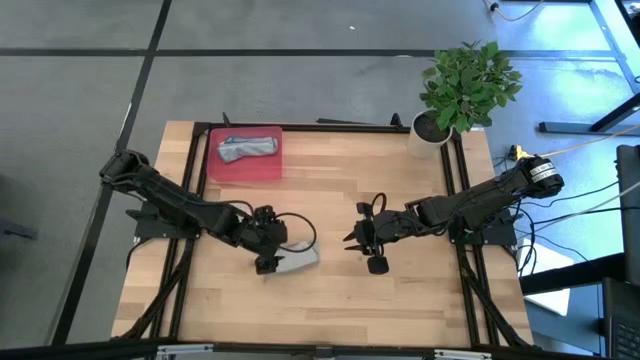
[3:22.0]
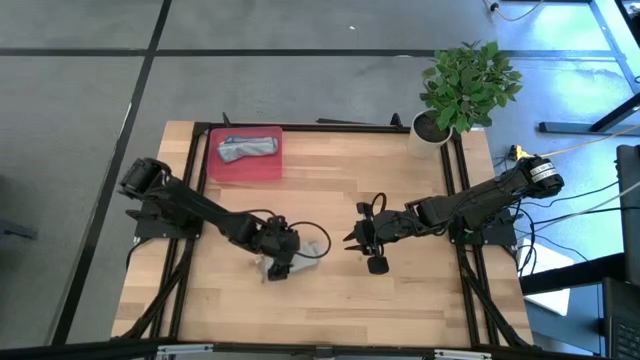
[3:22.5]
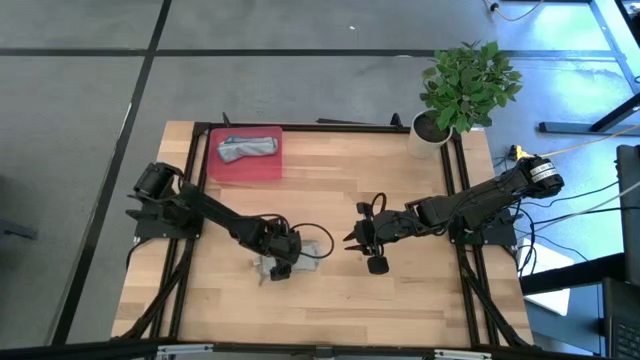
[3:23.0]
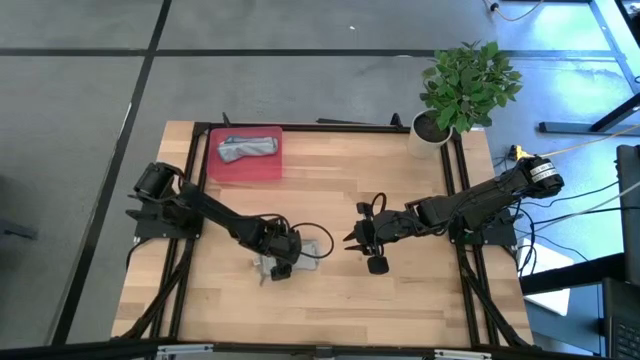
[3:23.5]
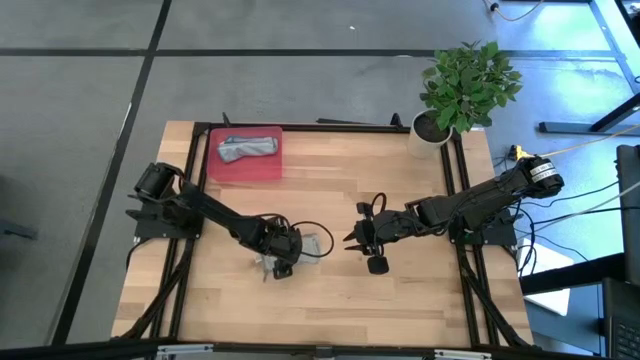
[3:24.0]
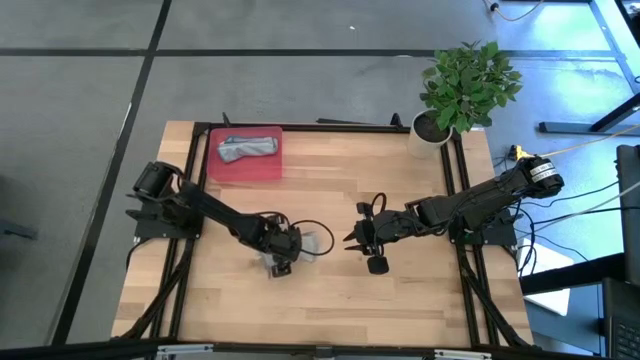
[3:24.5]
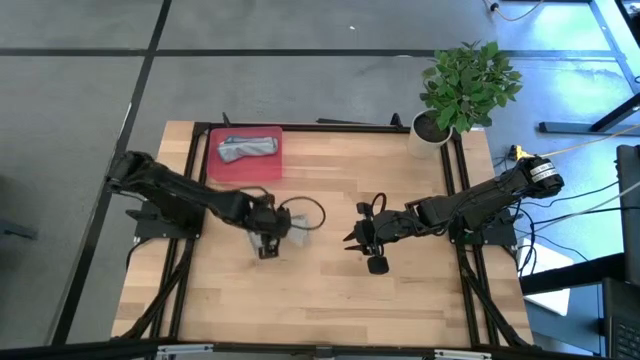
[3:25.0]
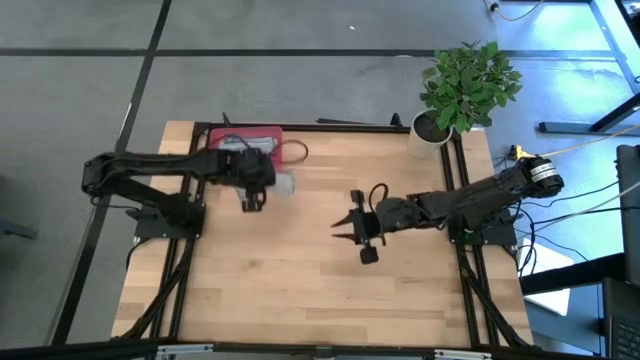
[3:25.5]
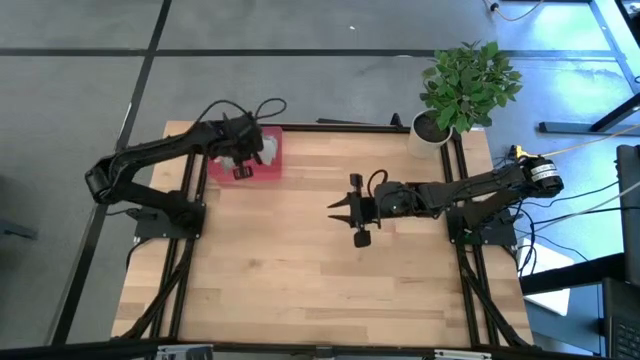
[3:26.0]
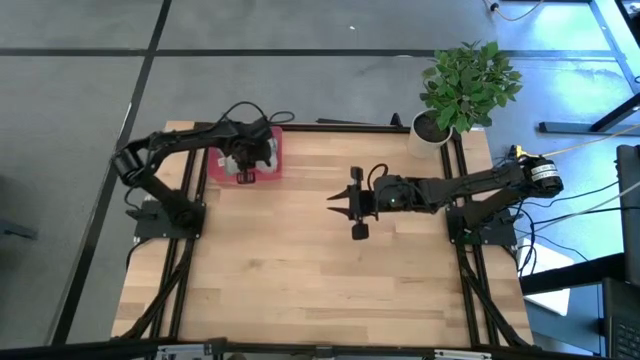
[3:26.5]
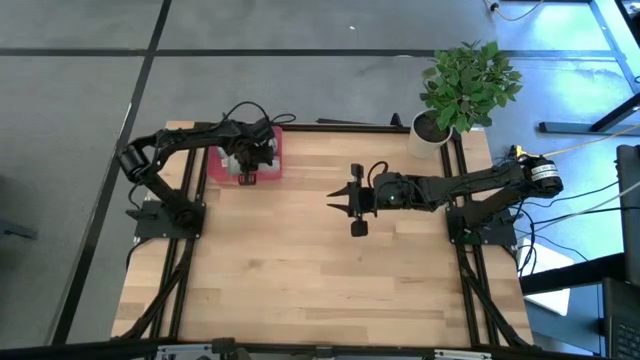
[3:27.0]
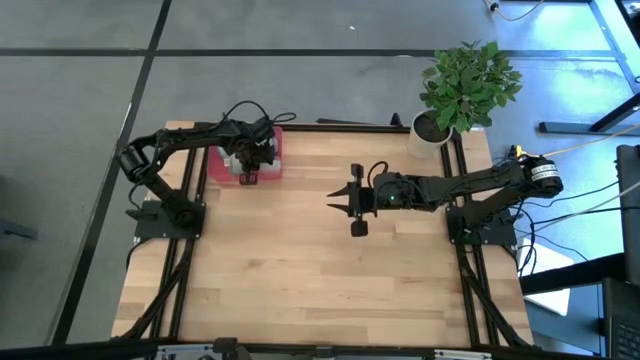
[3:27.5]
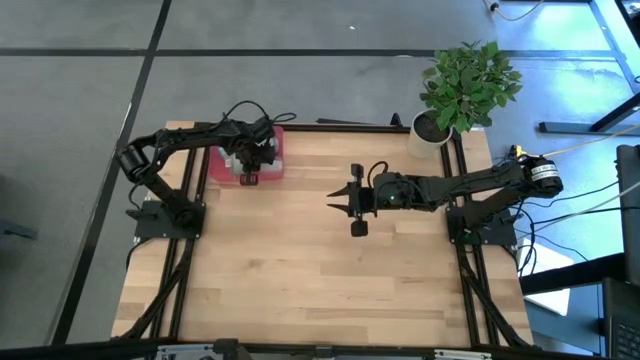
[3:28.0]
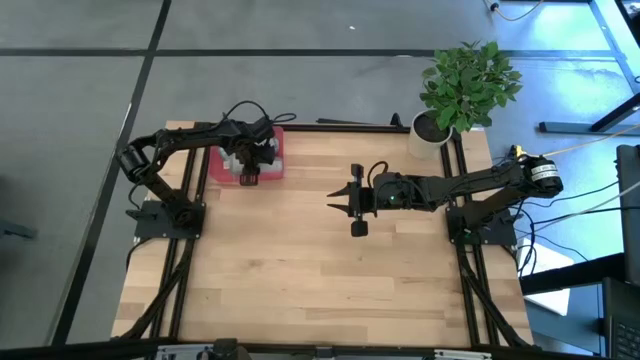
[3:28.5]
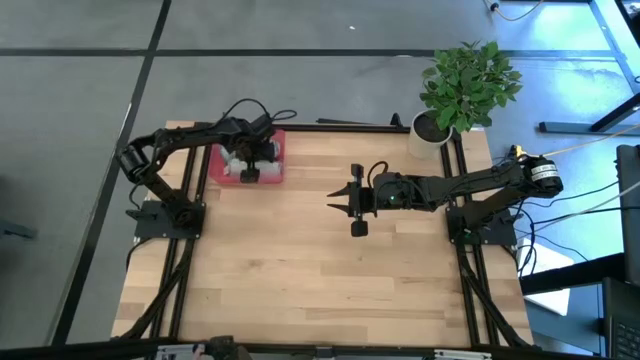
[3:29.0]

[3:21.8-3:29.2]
Task: Roll microfiber towels into tight, uniform cylinder then place into a basket
Put the gray towel into the pink bin

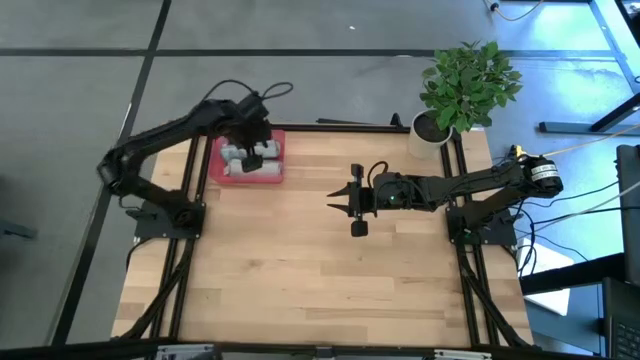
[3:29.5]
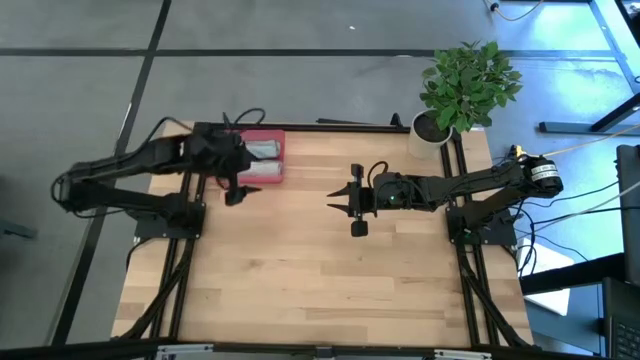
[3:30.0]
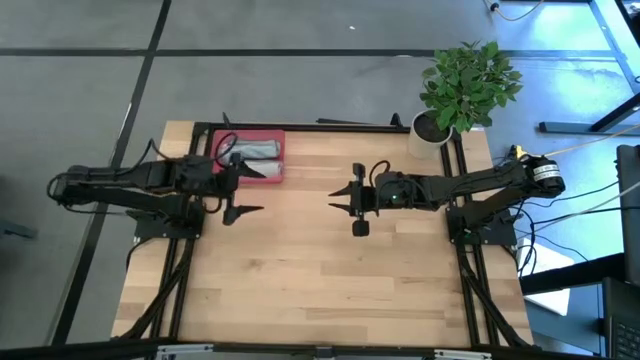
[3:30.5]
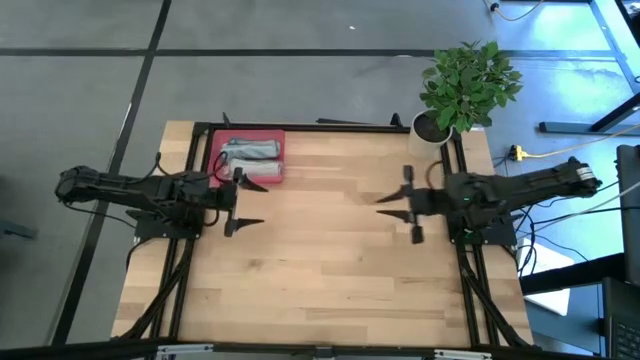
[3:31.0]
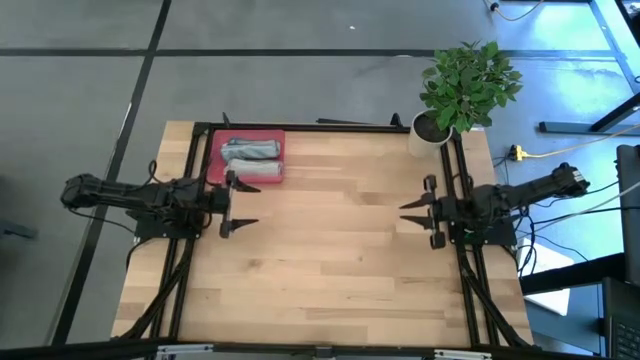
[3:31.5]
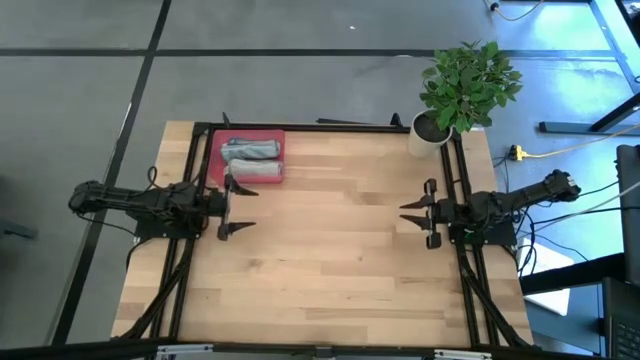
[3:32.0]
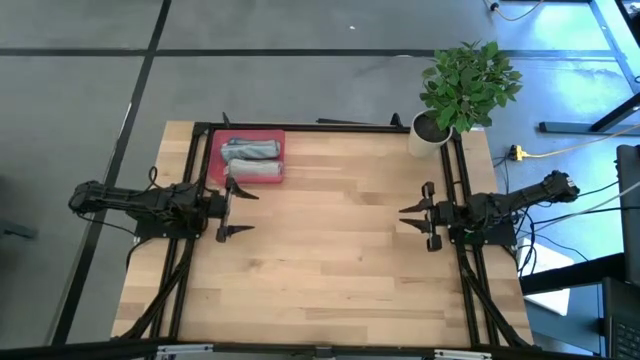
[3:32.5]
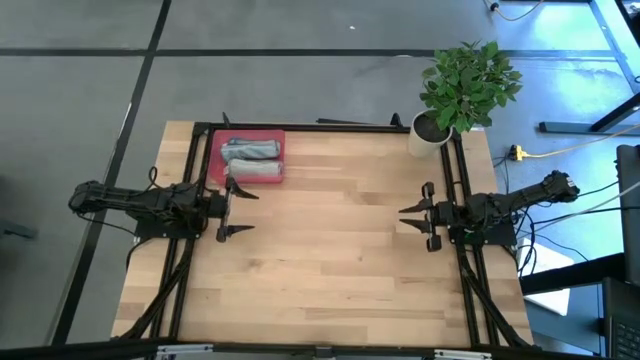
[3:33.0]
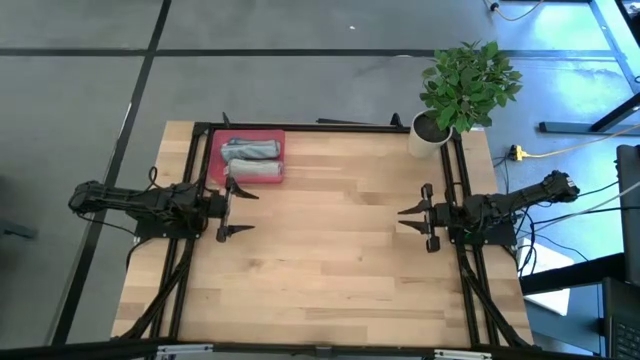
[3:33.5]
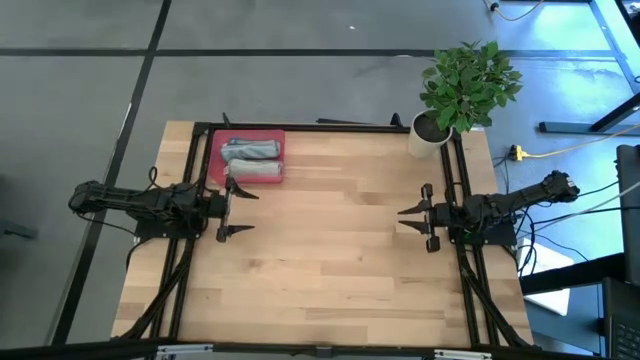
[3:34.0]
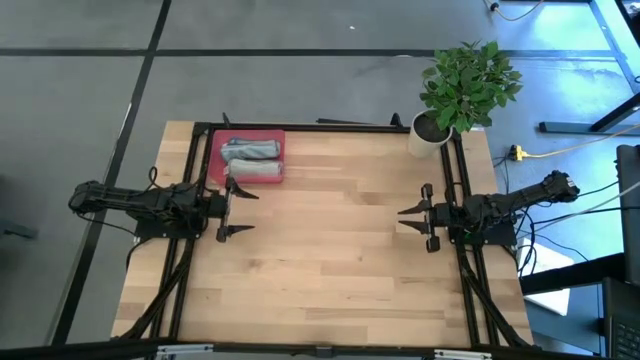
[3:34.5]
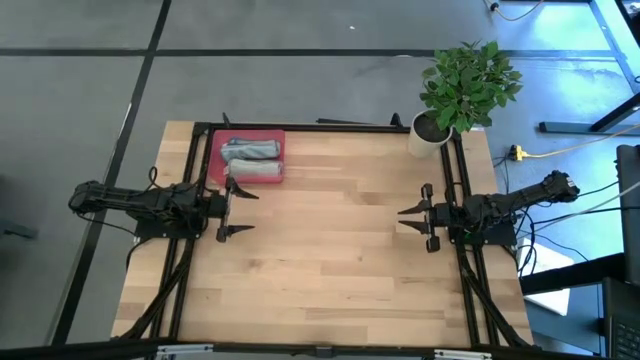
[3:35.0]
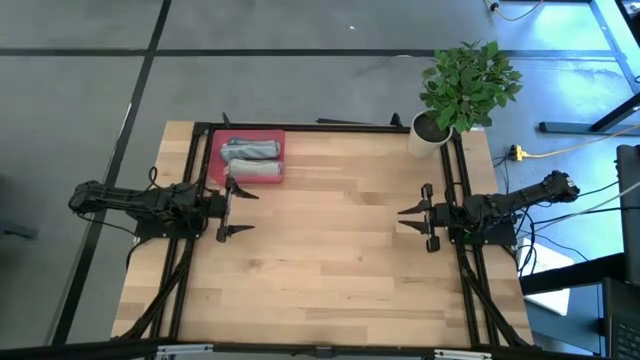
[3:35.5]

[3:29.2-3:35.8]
Return to Home Position

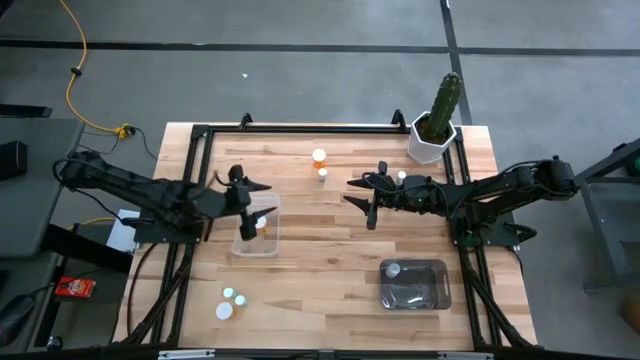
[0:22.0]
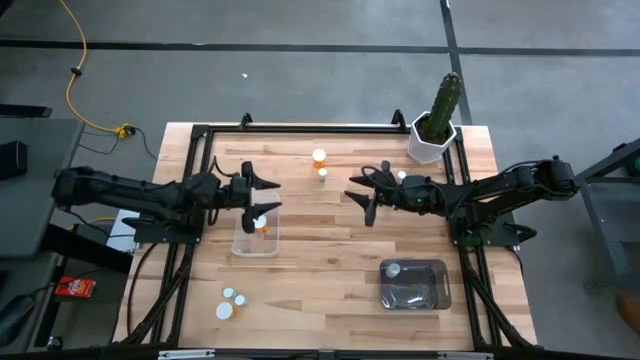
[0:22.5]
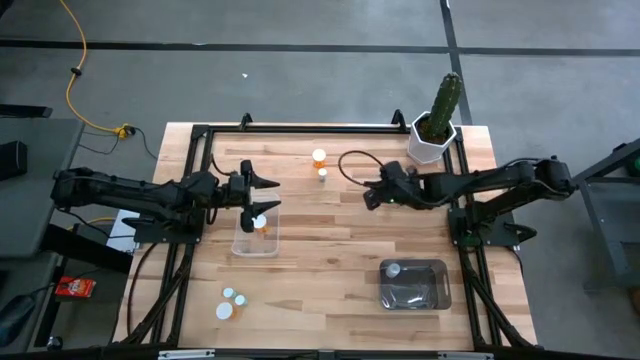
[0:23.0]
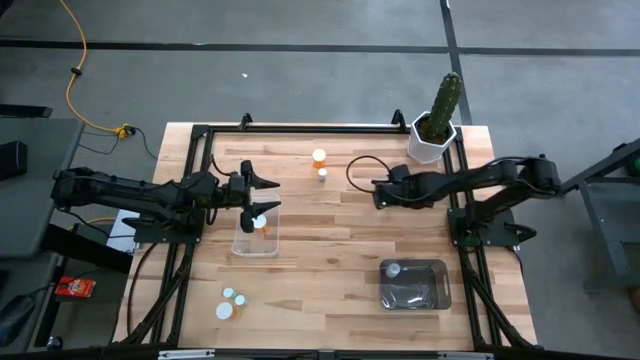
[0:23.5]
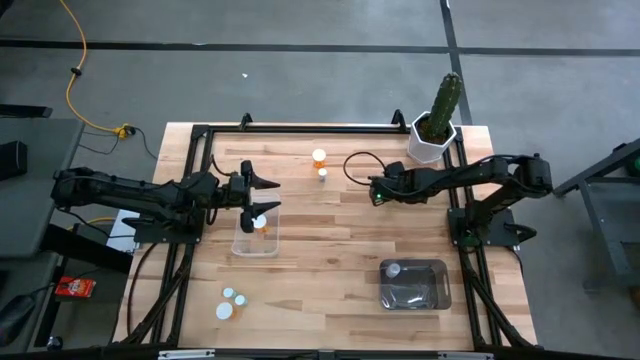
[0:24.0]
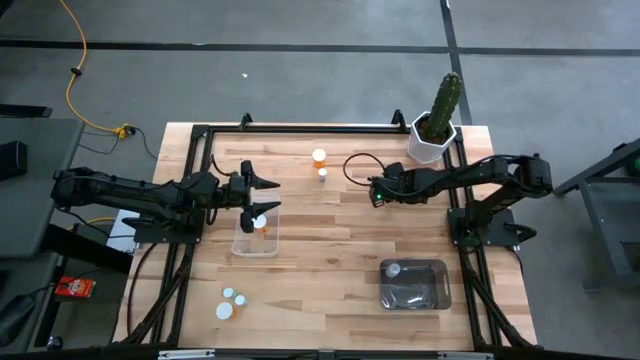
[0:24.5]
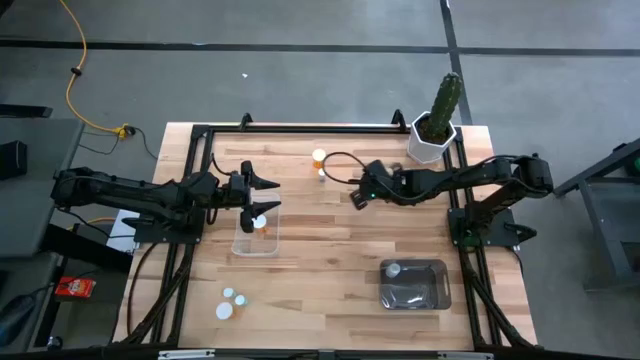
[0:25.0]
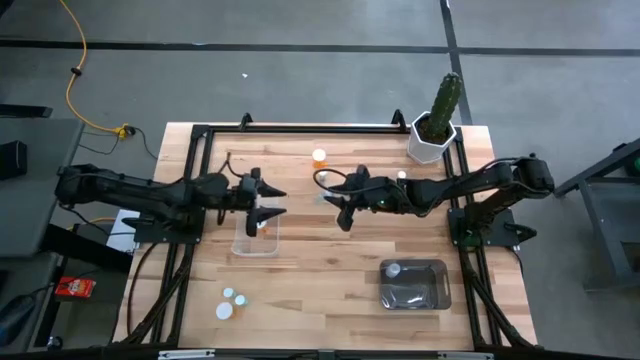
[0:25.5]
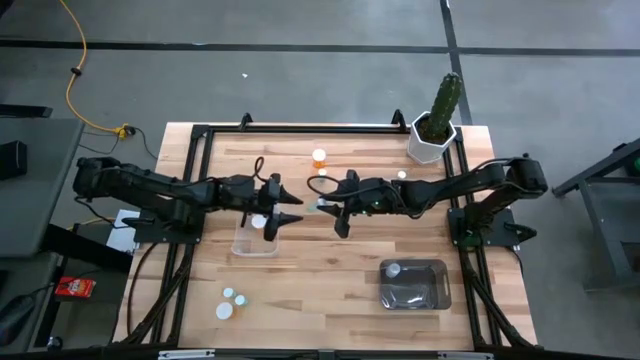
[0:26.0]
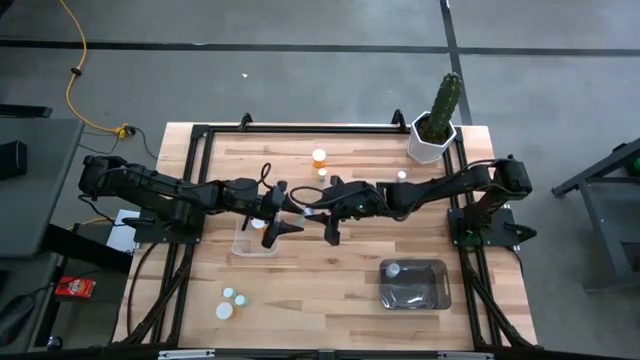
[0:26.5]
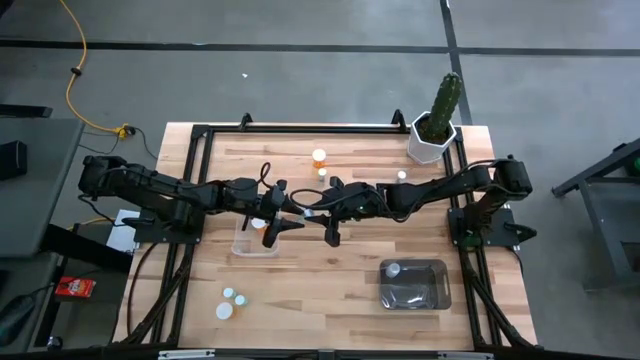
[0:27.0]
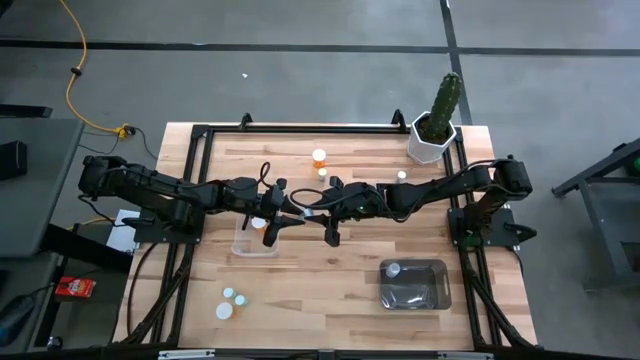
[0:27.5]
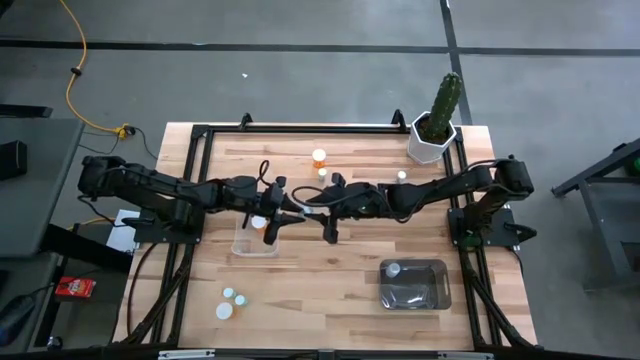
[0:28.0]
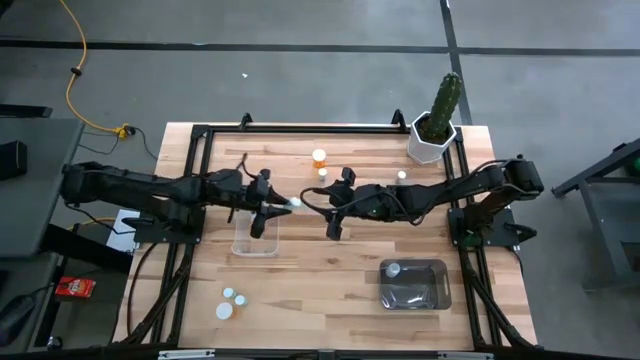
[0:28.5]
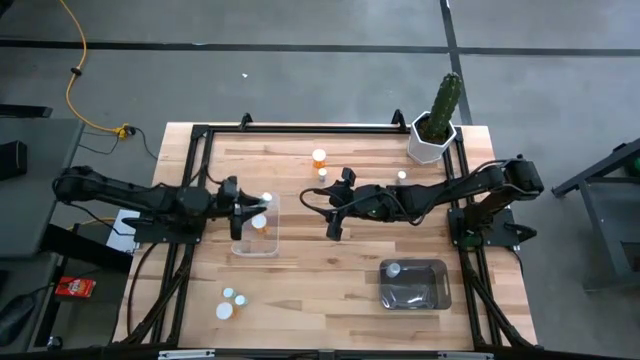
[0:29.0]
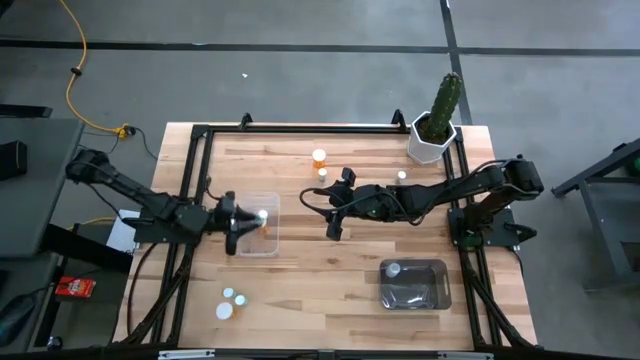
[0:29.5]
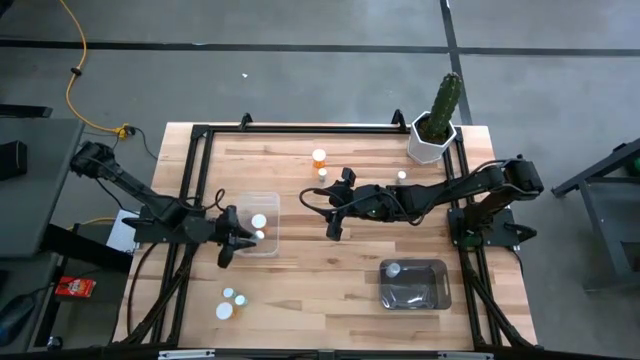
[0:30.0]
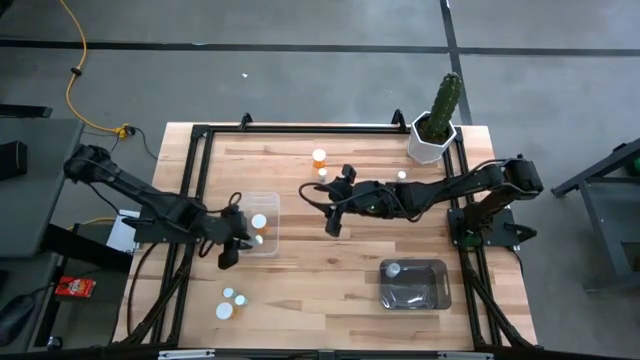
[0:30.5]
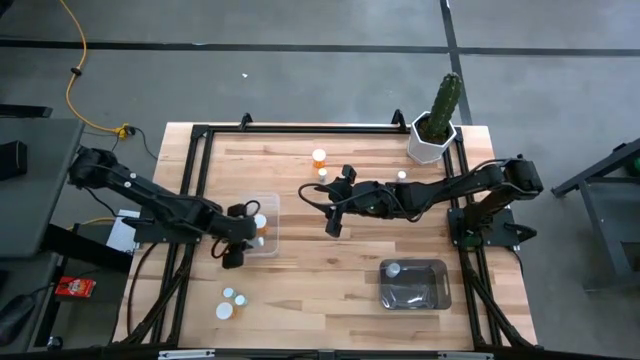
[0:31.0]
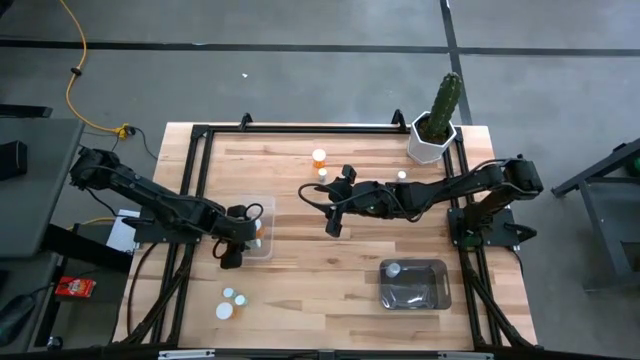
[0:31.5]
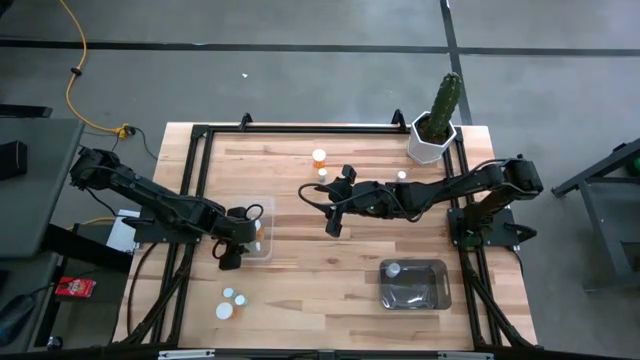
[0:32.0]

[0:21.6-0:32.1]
Task: Pick and place medicine bottles into bin by pill shape (circle, oval)
Put the top right blue tablet bottle into the black bin
